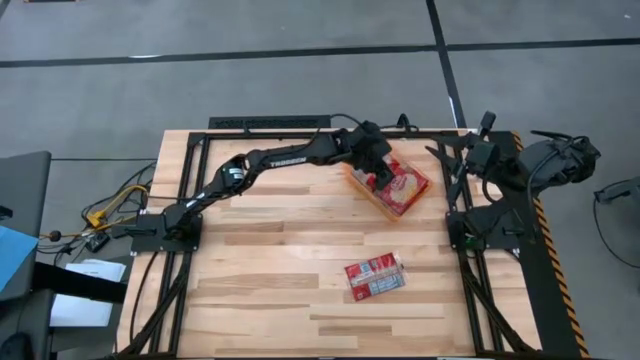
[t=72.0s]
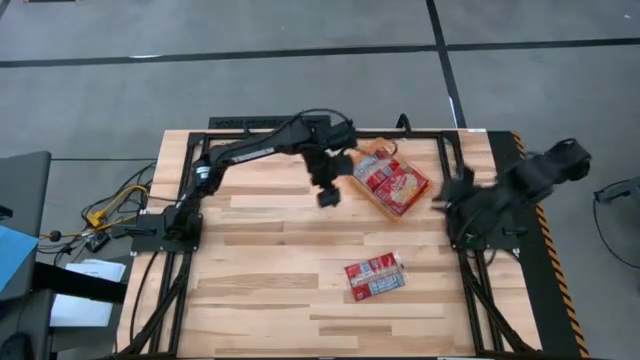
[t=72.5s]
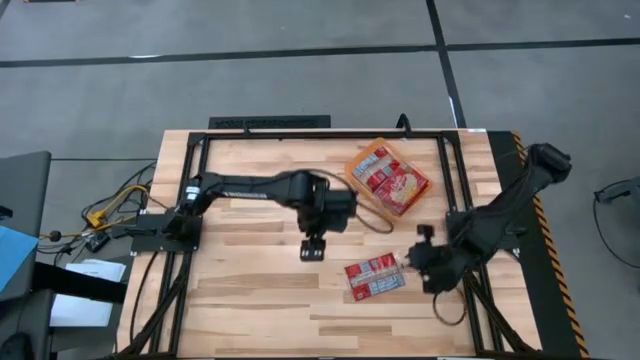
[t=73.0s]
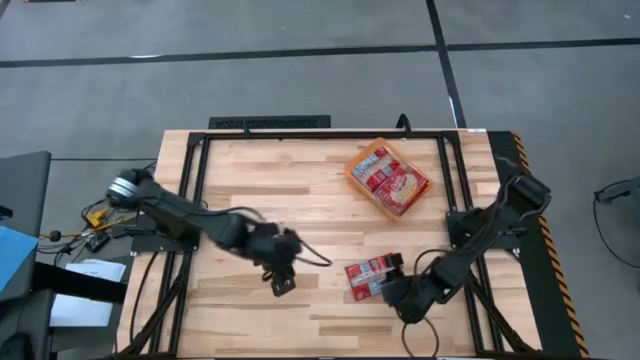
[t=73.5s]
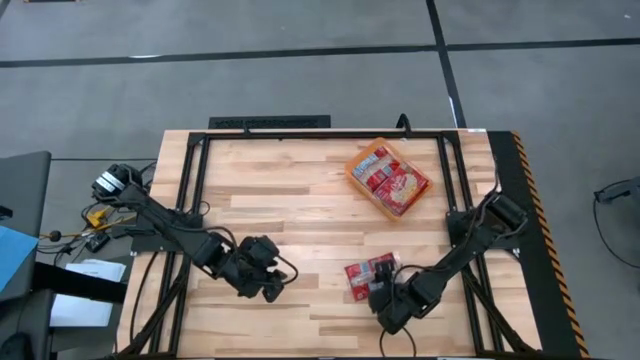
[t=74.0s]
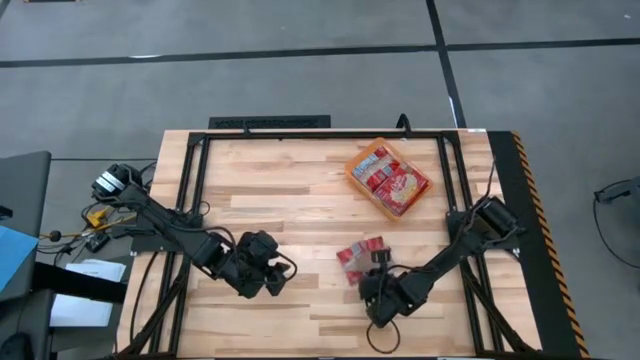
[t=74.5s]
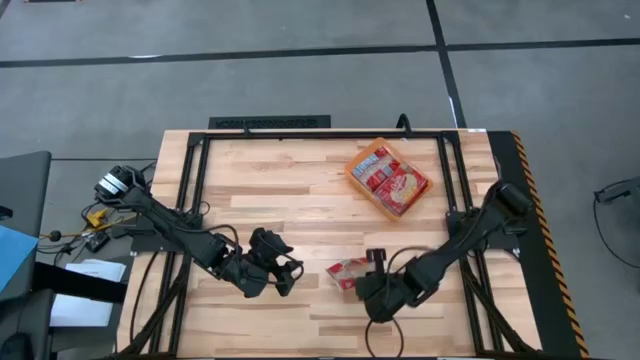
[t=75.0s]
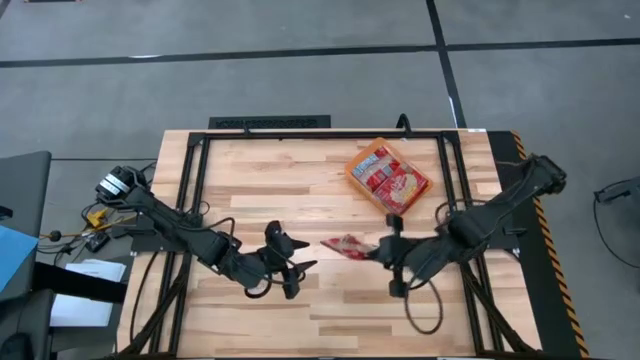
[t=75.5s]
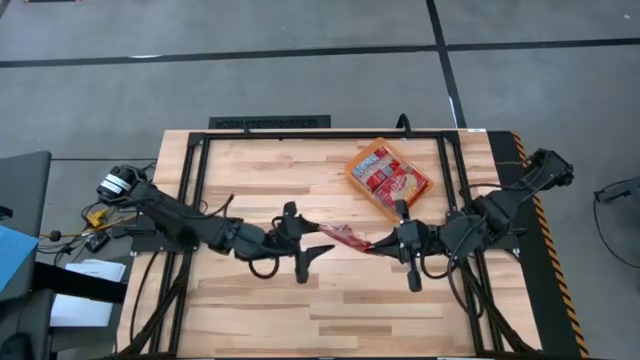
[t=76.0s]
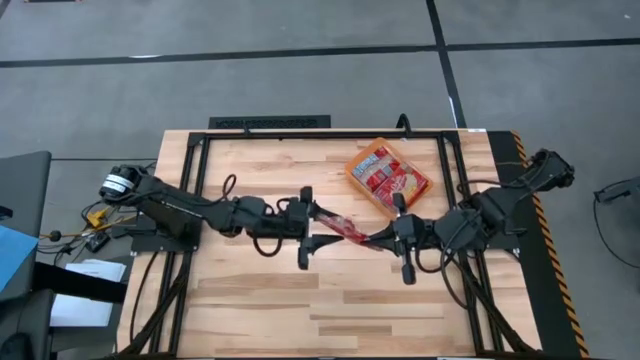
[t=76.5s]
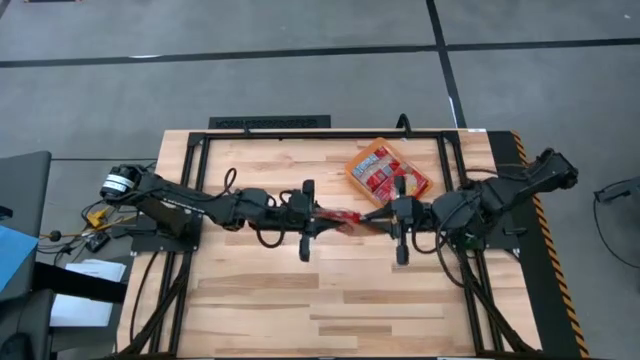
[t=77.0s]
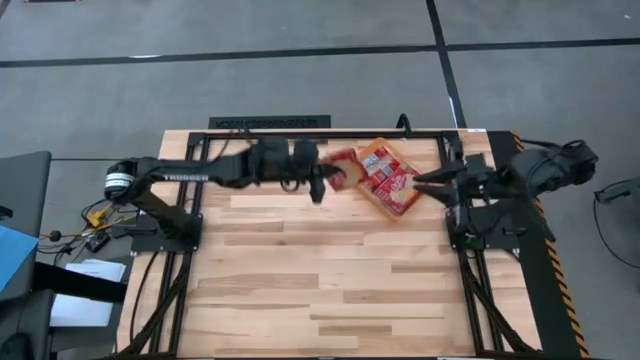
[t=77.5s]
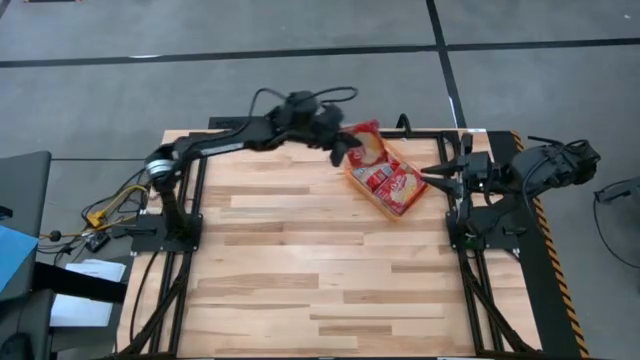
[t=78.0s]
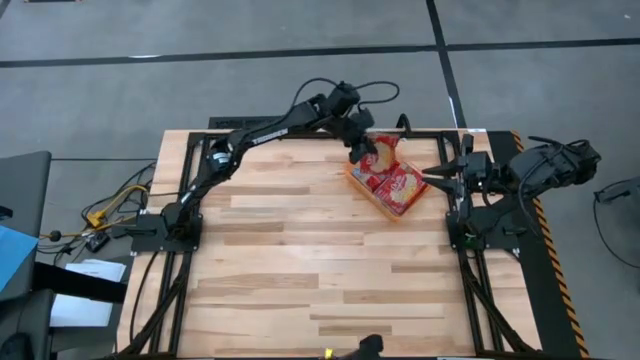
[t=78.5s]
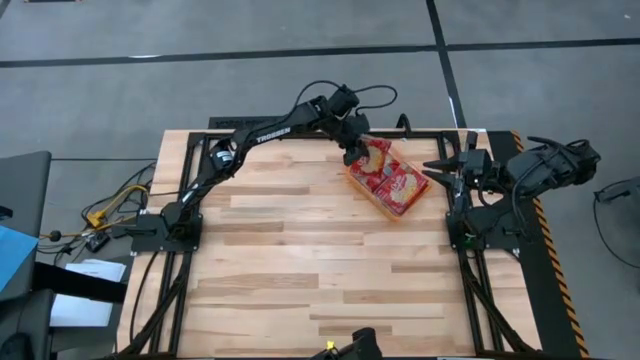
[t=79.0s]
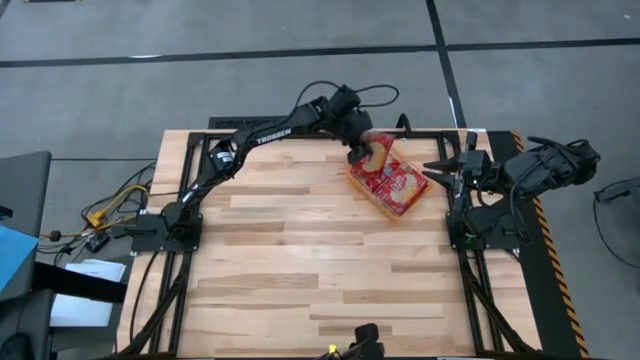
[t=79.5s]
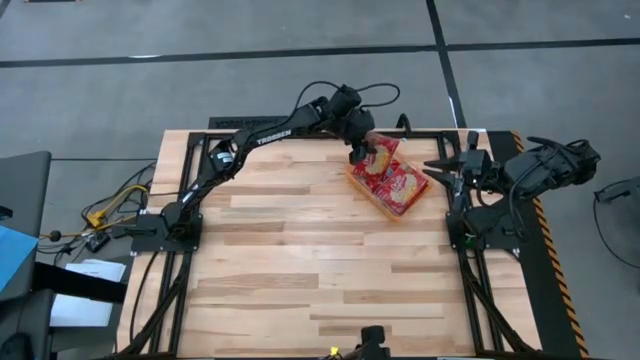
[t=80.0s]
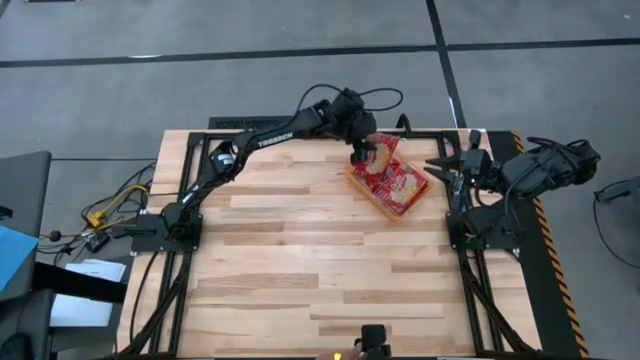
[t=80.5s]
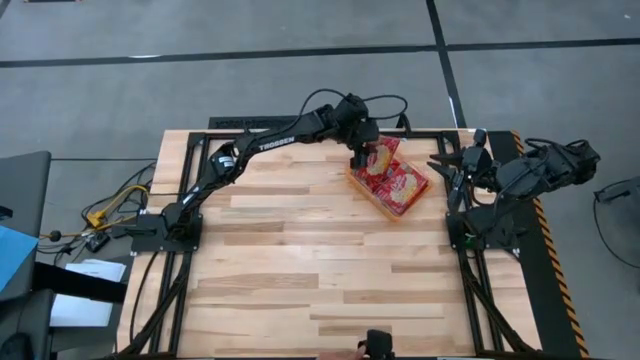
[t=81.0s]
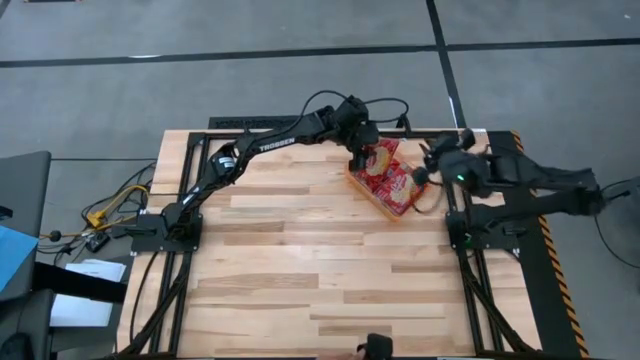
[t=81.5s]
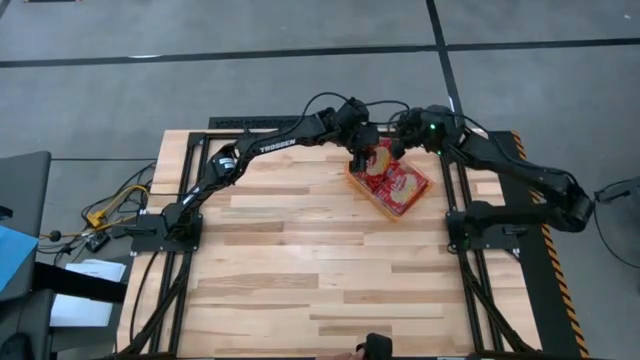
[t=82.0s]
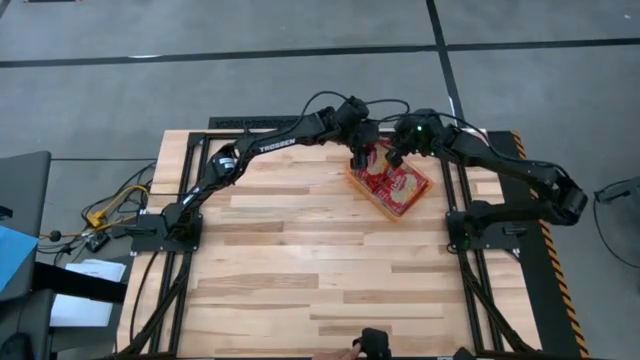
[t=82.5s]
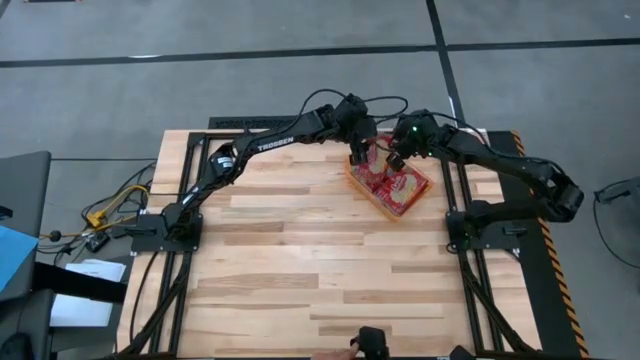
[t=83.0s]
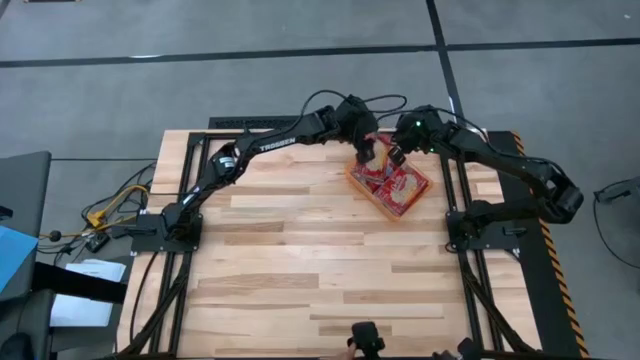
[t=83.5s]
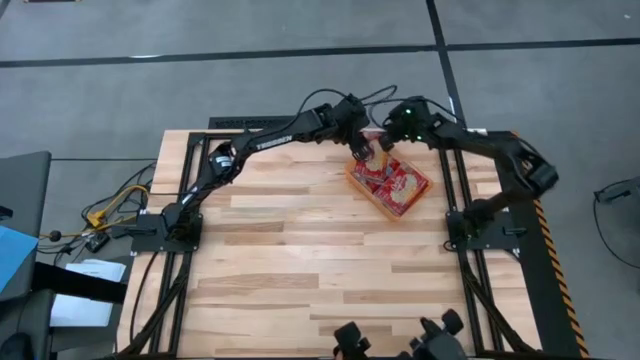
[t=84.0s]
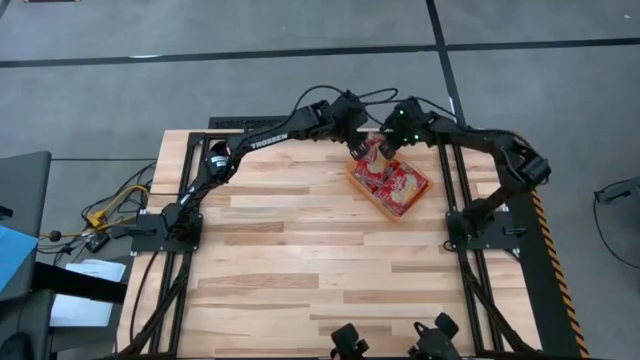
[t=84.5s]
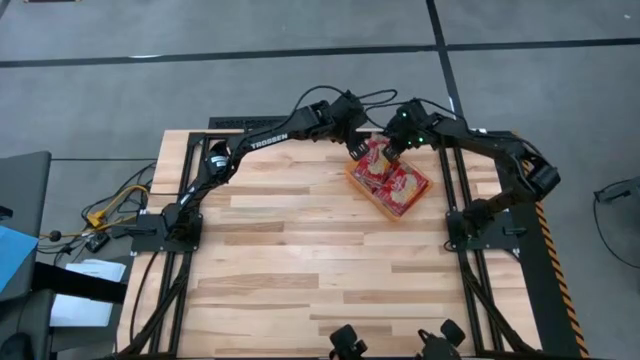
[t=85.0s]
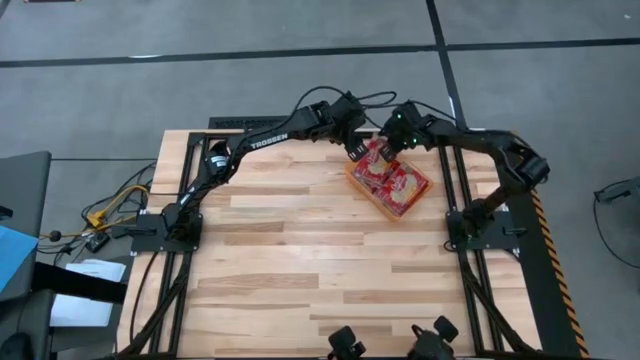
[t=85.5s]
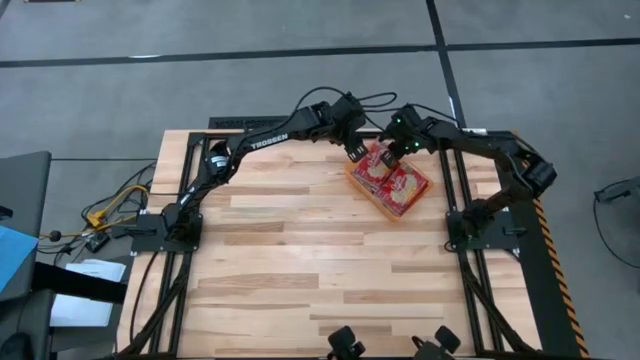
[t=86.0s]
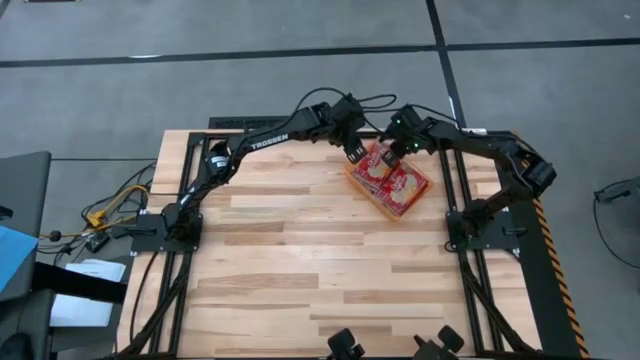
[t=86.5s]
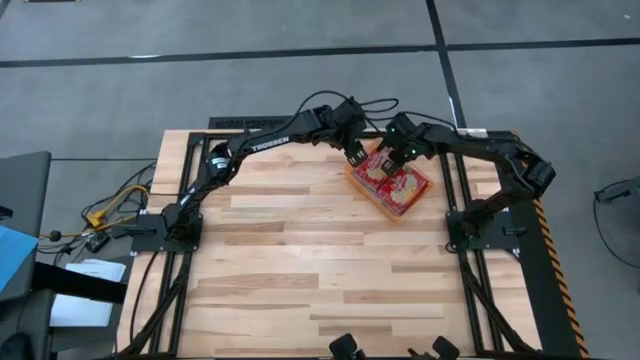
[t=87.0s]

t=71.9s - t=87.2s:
Task: Sort popcorn bags into baskets
Put the popcorn bag into the orange transparent bin

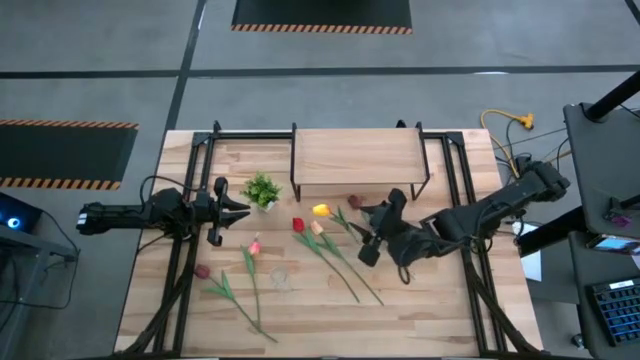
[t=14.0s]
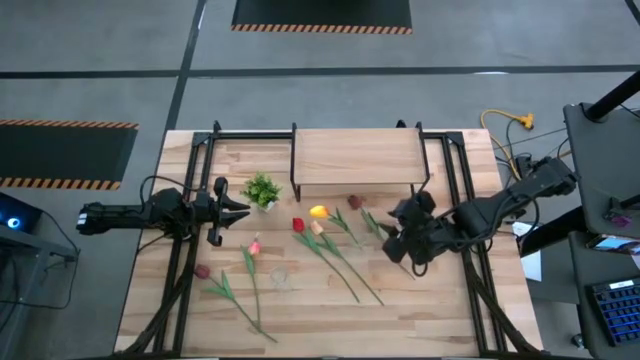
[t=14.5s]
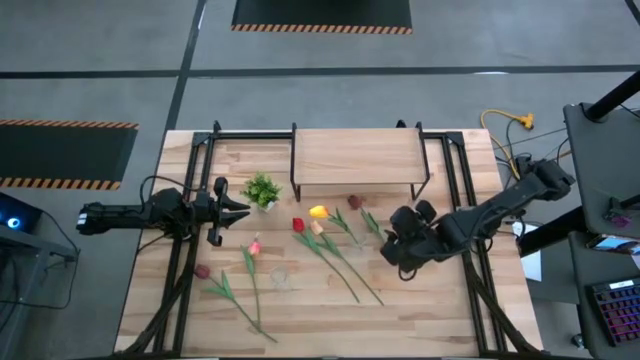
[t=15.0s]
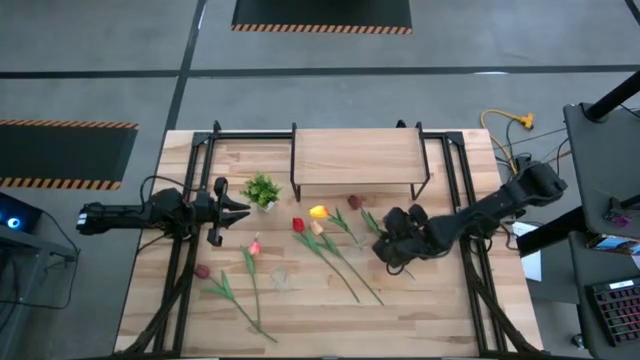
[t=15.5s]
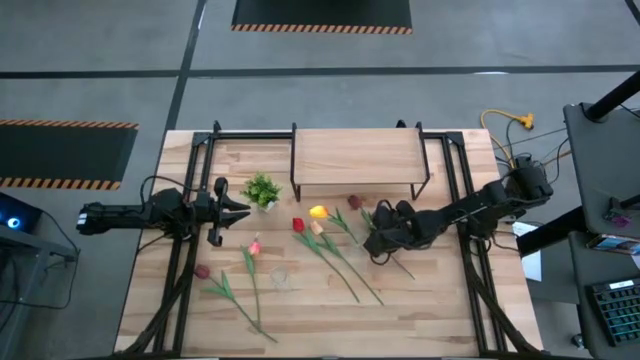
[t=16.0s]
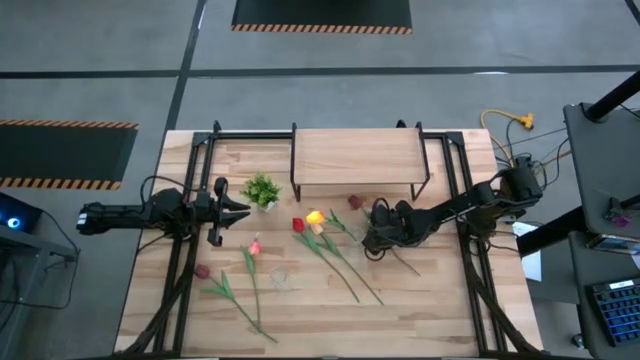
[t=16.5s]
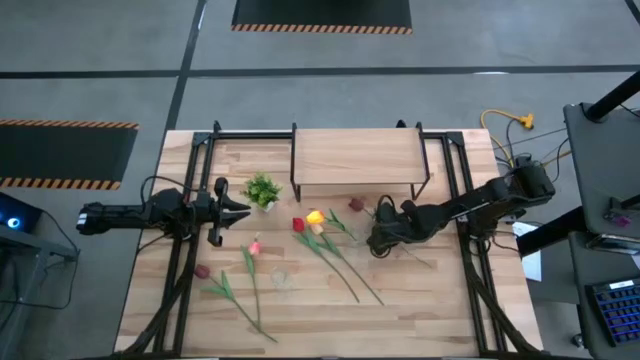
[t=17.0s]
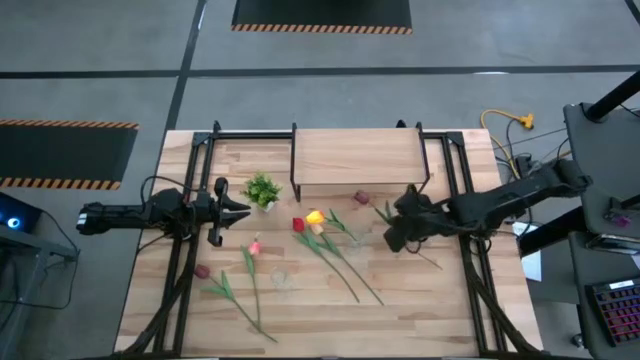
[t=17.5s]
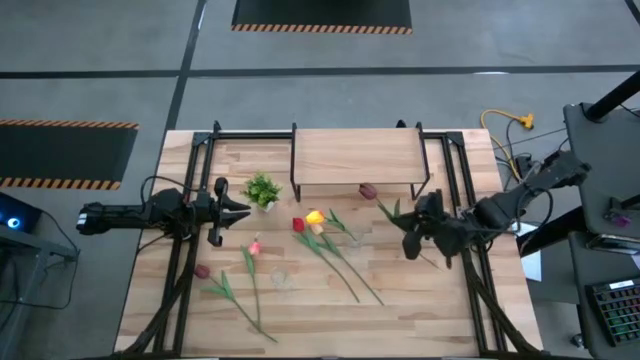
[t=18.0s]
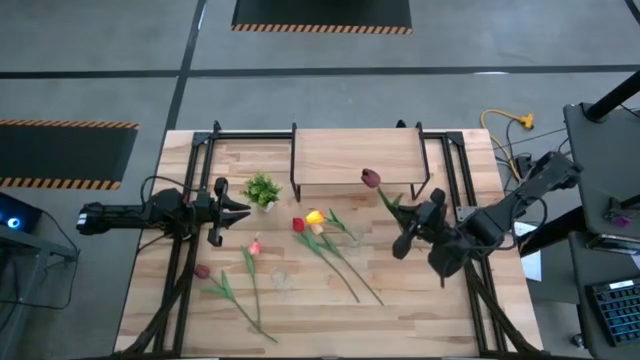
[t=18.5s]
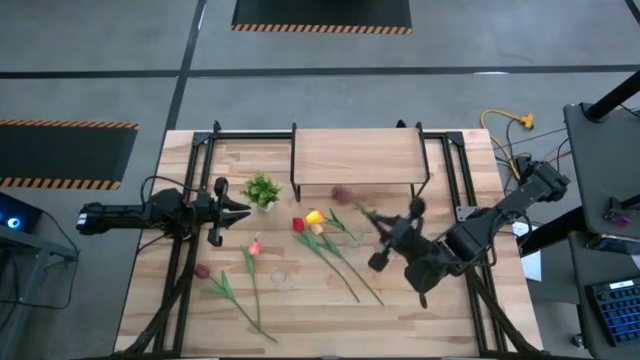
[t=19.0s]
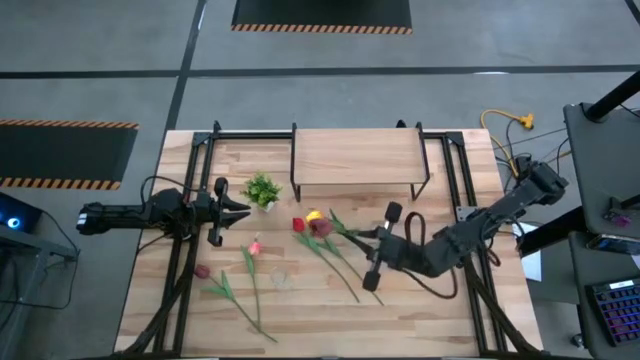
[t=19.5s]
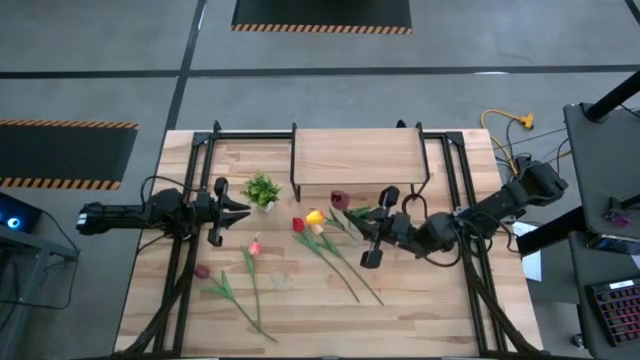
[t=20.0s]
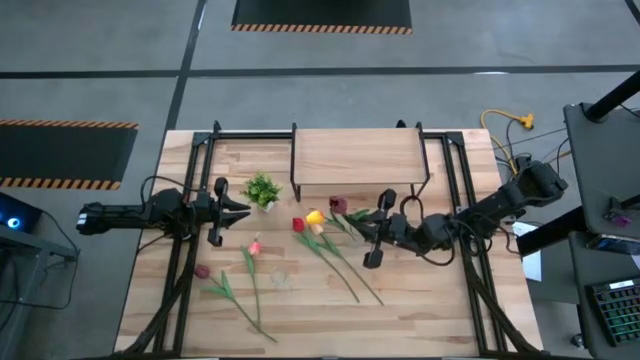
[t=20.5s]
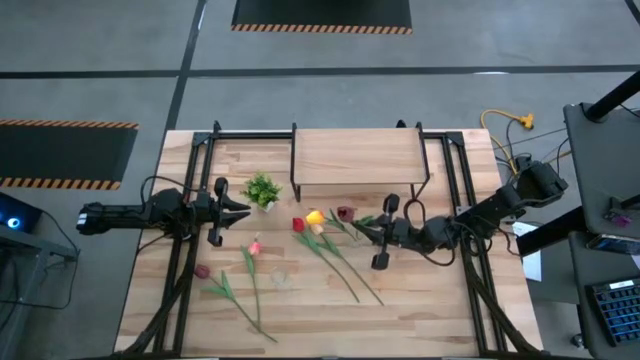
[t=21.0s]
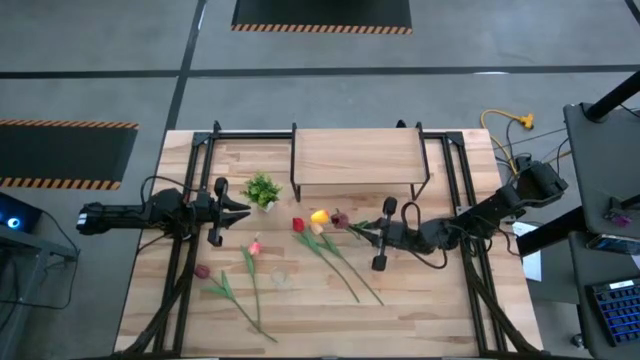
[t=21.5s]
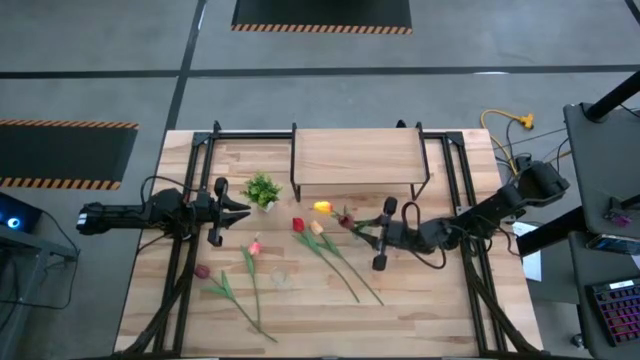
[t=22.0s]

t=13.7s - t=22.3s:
Task: Pick and place flowers into a vace then onto a shelf
Put the dark red tulip into the right transparent bin
